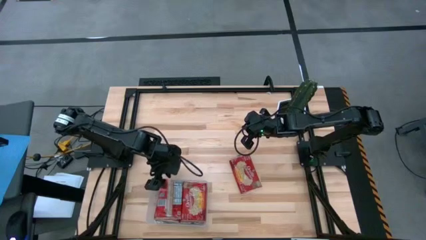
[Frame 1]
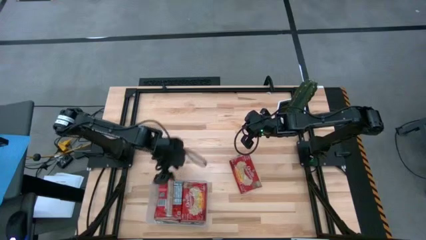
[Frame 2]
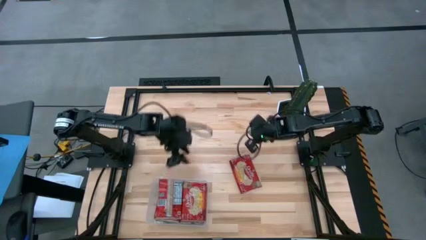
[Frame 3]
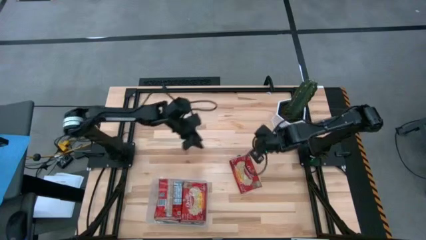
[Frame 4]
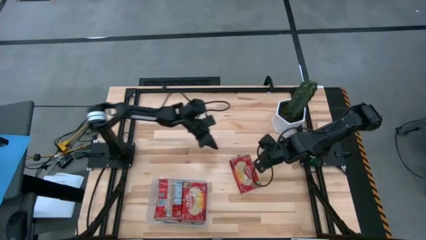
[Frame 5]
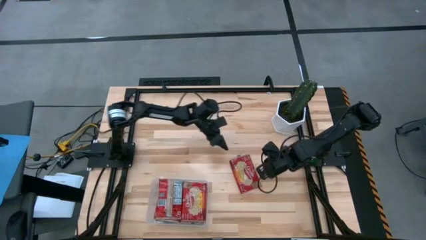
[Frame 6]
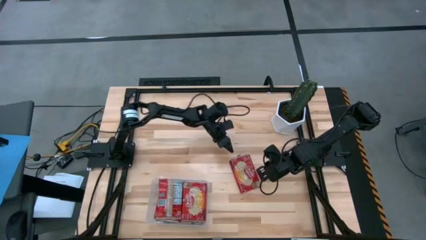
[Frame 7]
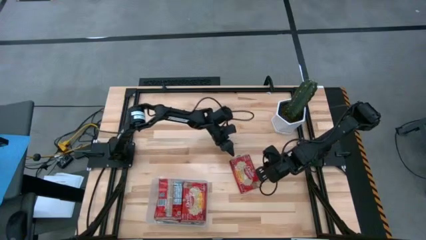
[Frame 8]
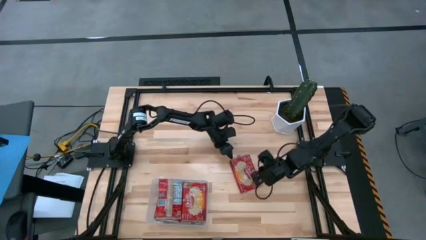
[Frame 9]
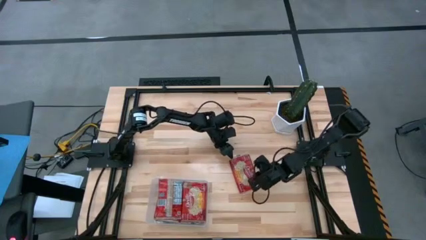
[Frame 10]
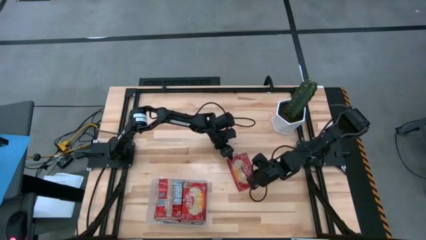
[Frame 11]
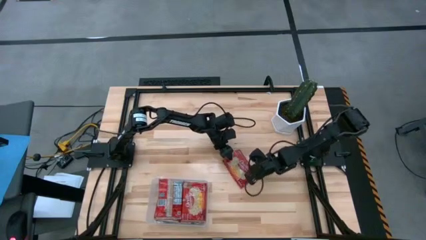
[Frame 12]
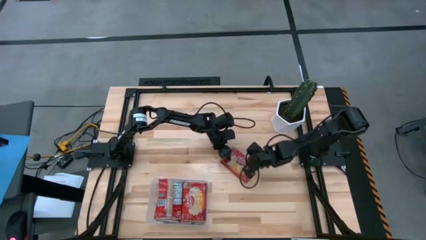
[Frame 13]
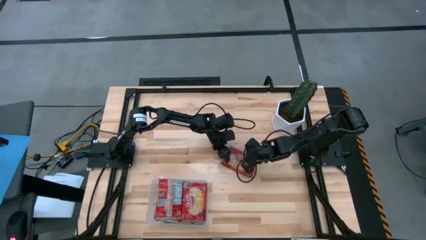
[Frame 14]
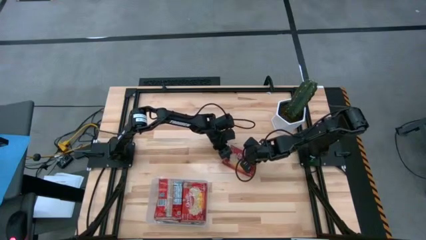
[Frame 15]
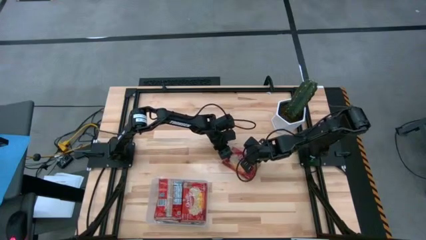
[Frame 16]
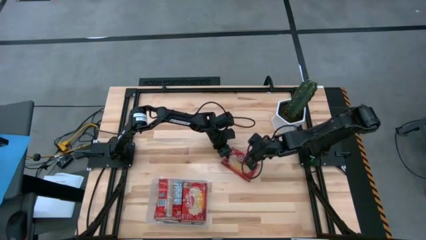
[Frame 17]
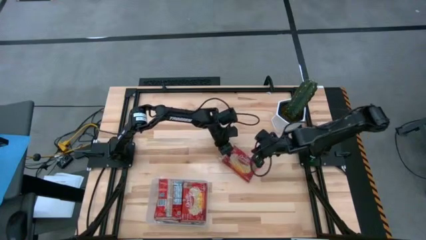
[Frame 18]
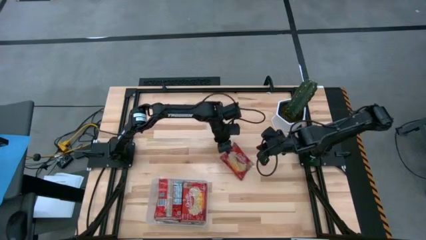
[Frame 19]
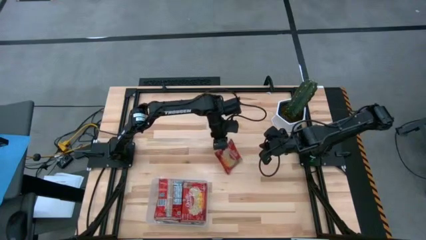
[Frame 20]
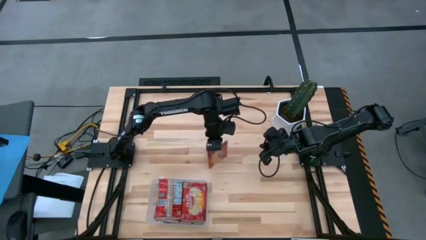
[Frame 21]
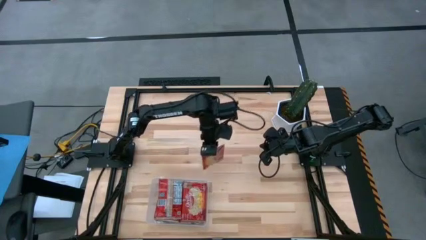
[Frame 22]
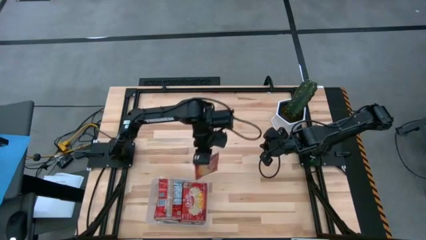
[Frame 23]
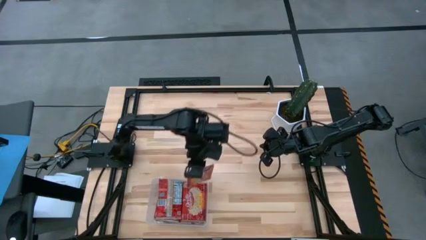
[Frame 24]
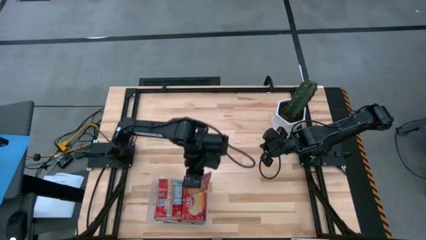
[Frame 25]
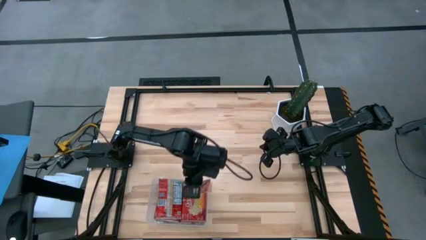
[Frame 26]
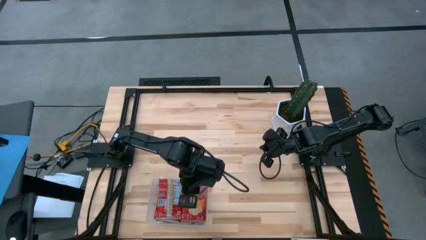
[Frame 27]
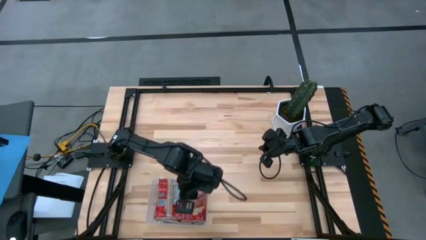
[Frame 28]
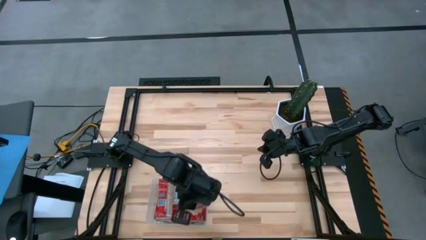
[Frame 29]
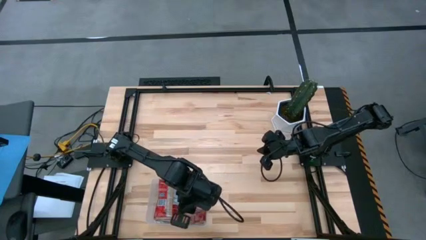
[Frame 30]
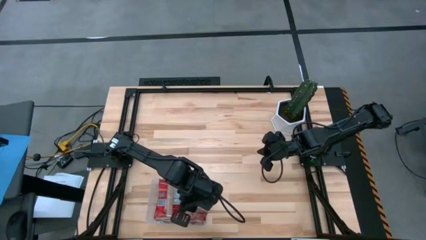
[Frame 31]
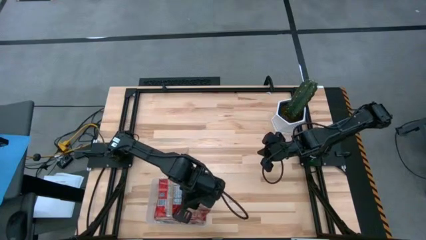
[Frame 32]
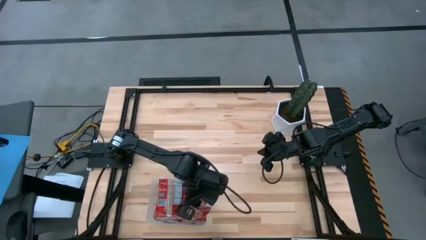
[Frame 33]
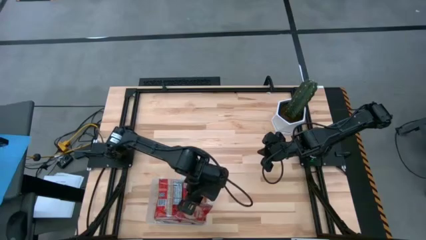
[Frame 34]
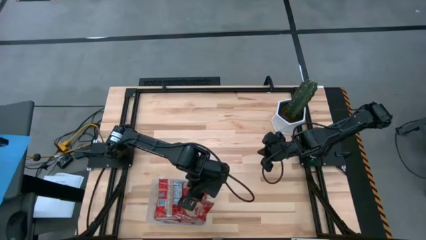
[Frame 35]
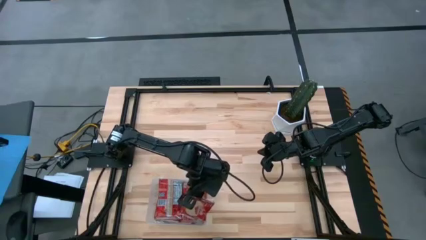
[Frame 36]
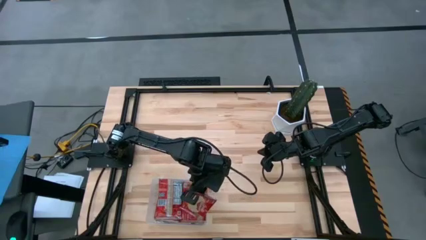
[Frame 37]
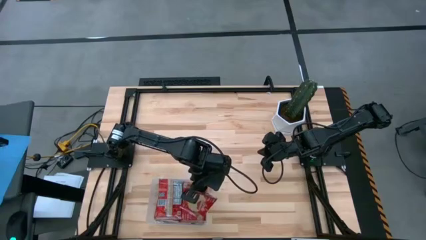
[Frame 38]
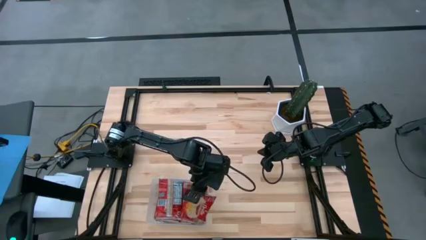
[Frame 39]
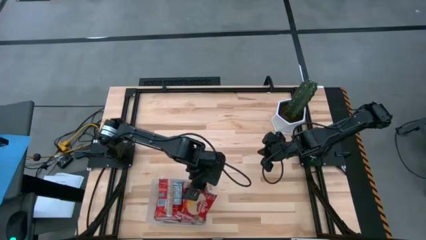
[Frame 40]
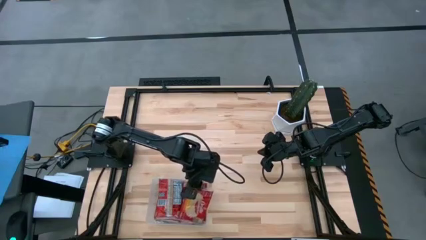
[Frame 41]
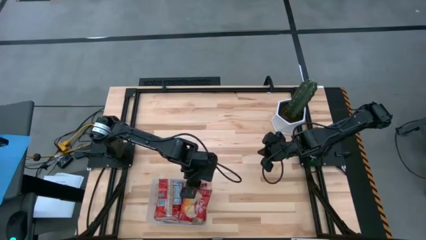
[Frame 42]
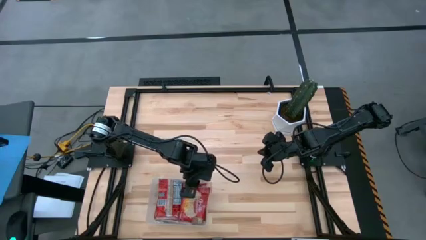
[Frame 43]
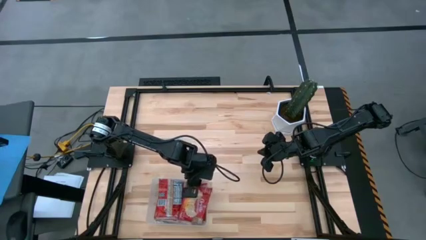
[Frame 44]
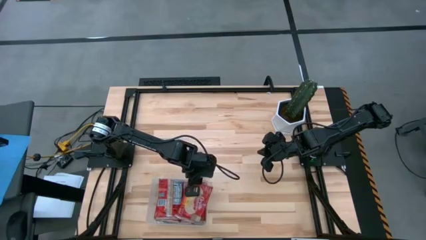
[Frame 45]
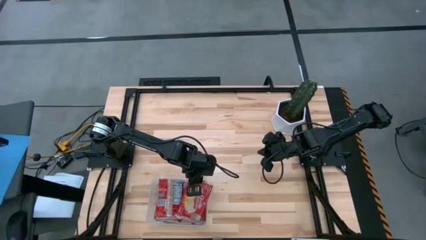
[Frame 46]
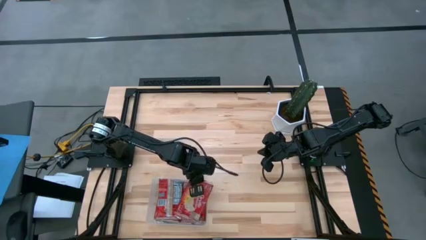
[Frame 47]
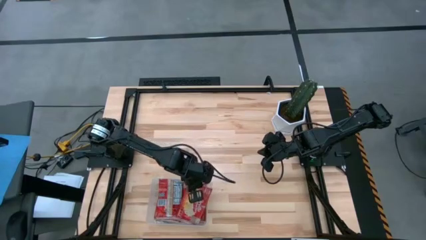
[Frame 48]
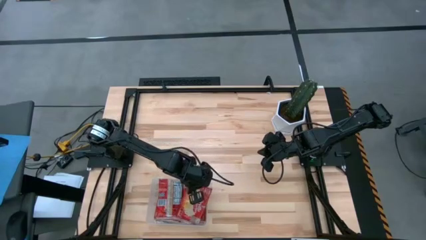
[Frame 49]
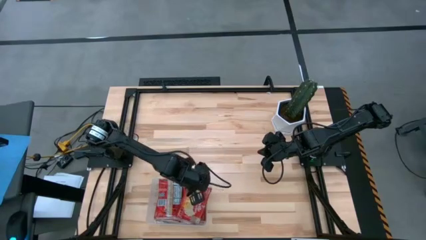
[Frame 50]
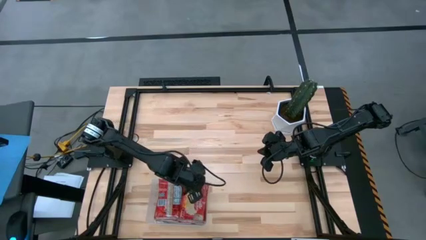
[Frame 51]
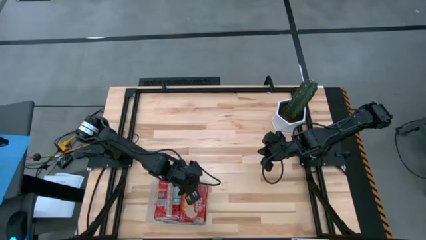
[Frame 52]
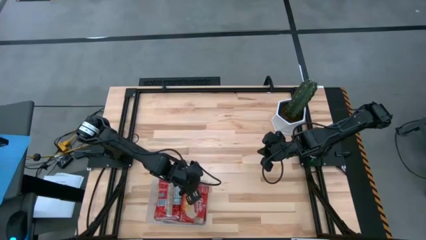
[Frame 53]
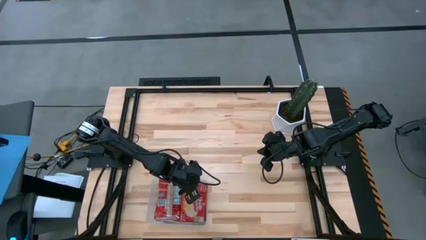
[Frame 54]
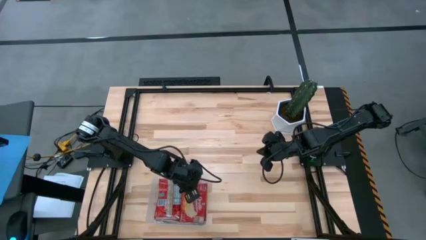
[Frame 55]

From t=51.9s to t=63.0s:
Task: Sort popcorn bags into baskets
Put the popcorn bag into the transparent bin

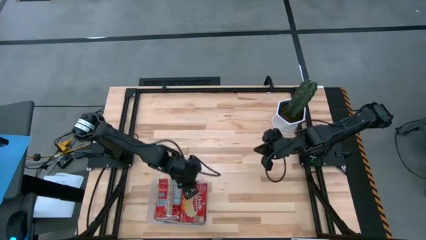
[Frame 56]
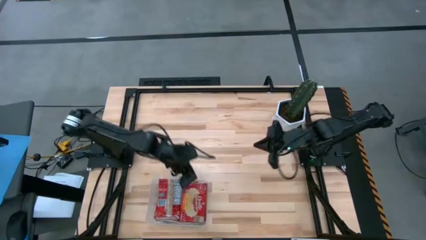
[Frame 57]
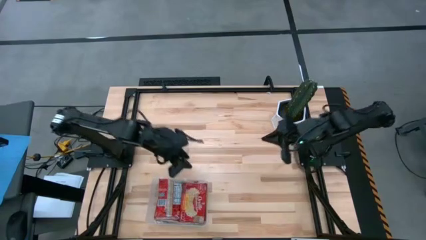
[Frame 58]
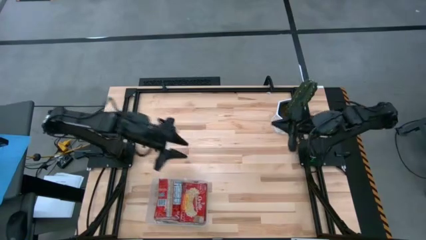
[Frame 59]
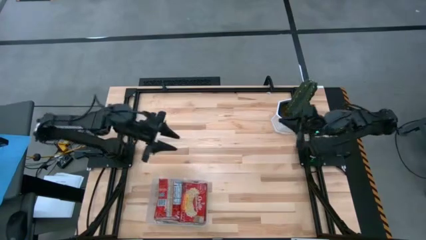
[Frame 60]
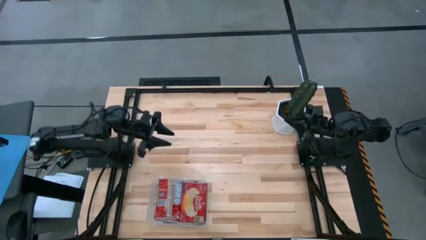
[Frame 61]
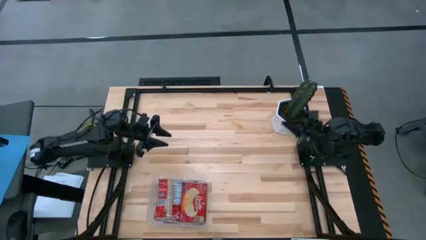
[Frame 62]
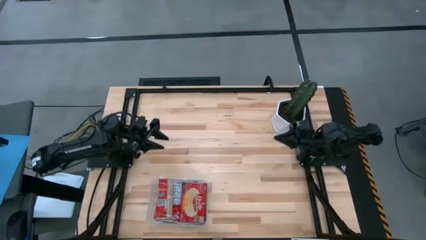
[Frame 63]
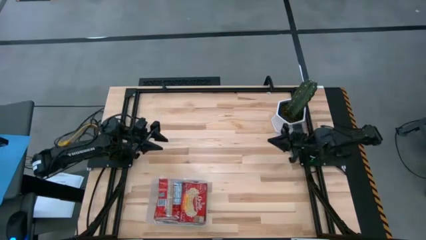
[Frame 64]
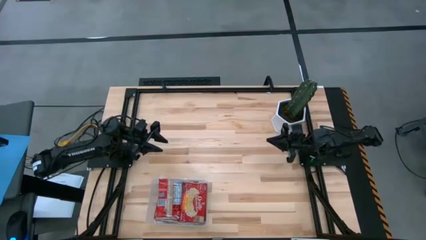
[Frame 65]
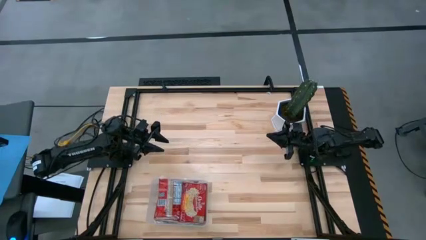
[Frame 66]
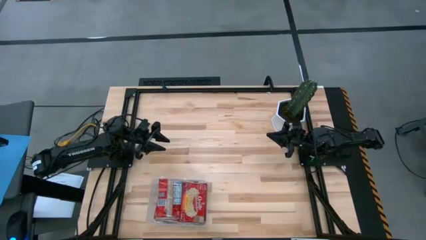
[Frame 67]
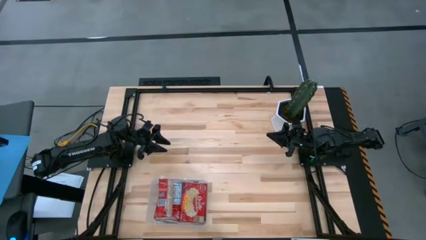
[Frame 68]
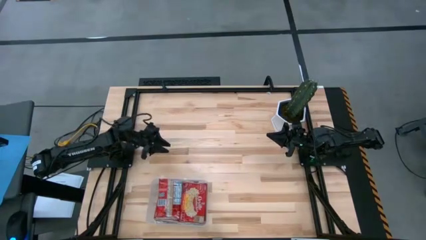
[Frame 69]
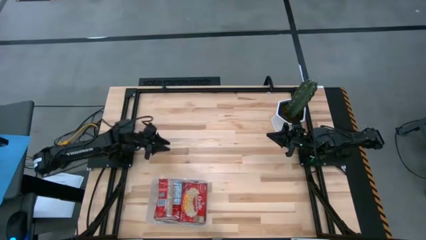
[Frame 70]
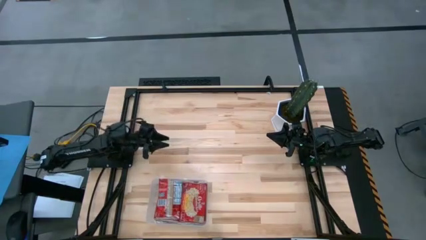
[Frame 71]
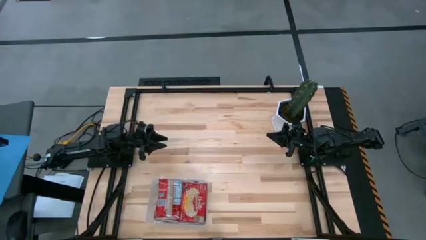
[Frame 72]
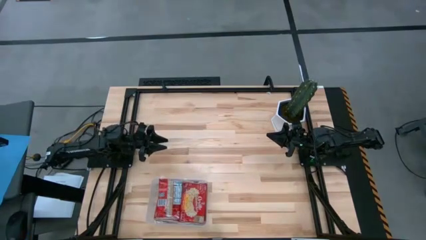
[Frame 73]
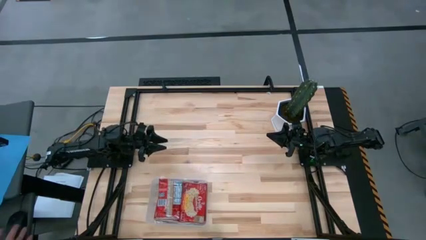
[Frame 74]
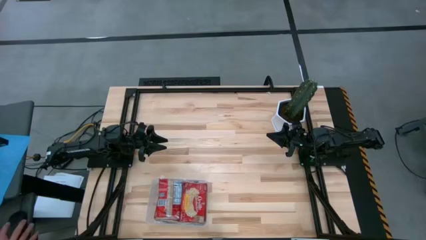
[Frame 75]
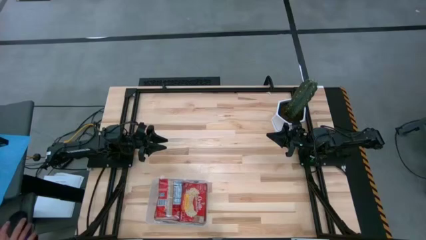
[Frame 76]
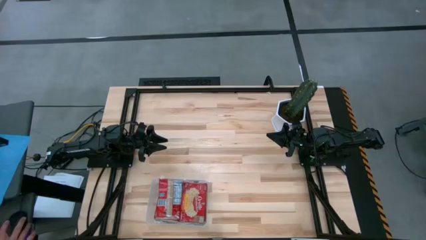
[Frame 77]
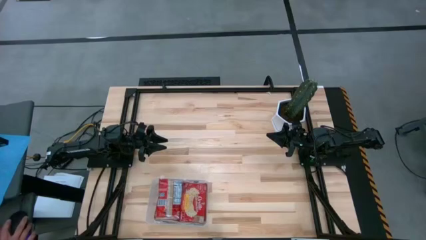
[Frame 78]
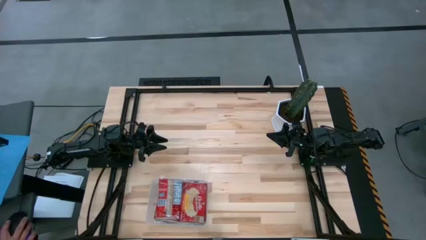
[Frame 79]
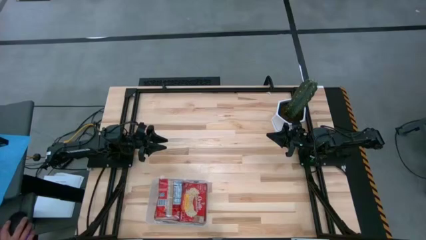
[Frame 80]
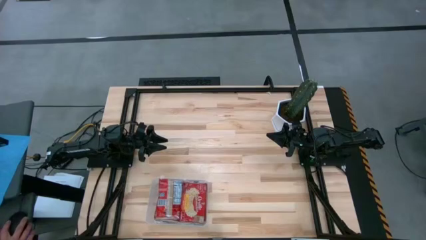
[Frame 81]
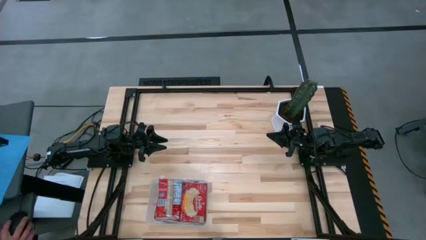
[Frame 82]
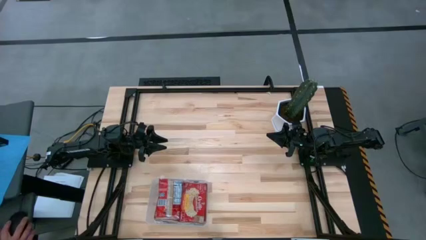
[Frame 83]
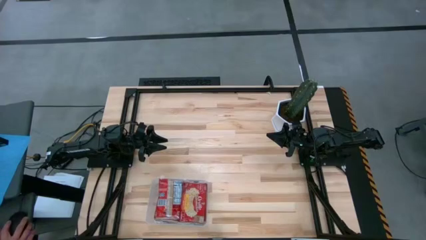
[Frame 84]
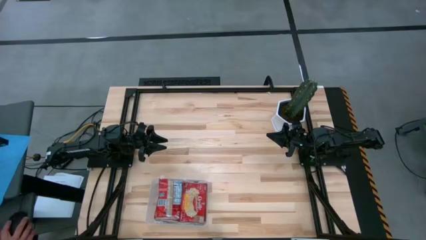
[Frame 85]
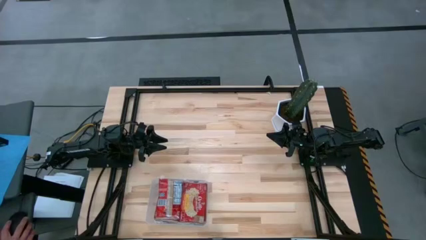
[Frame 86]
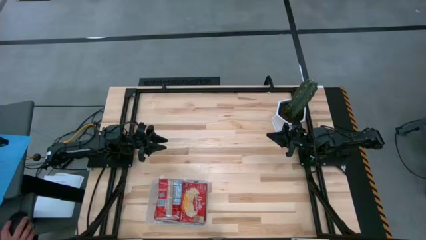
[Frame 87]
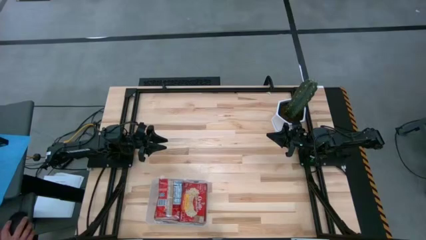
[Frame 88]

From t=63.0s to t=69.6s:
Return to Home Position
